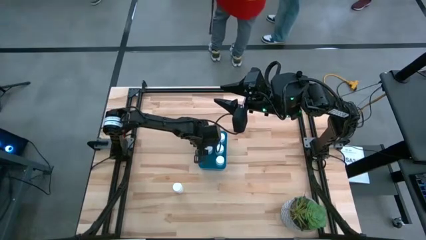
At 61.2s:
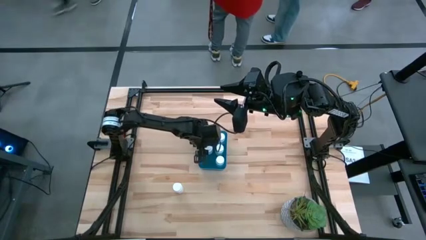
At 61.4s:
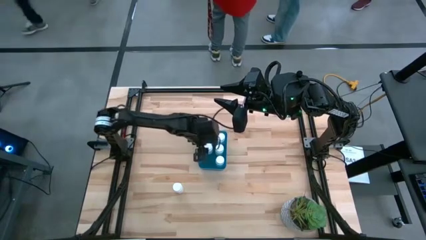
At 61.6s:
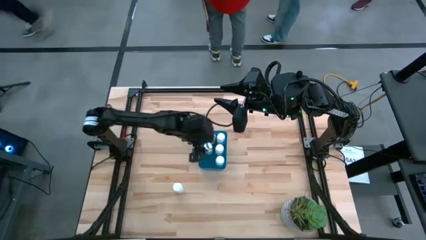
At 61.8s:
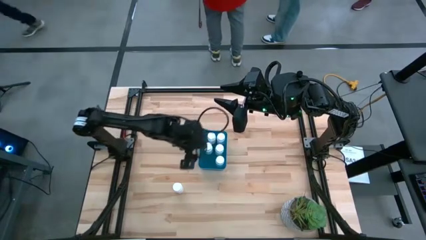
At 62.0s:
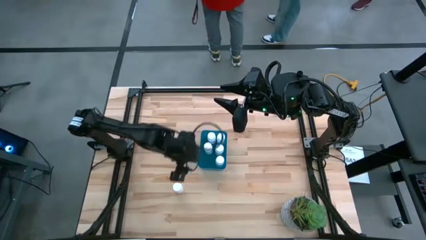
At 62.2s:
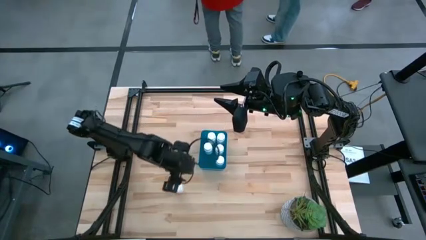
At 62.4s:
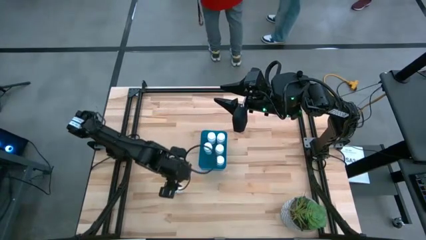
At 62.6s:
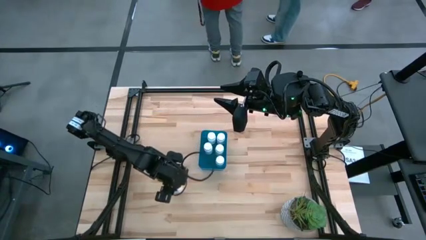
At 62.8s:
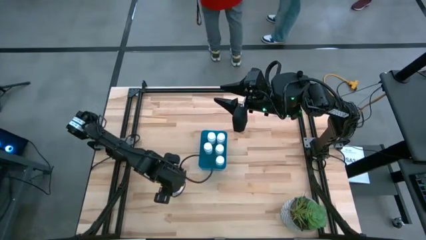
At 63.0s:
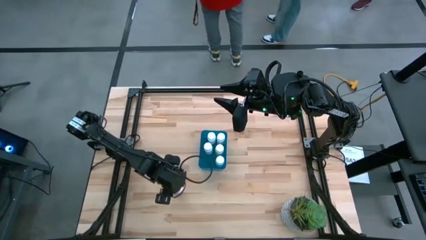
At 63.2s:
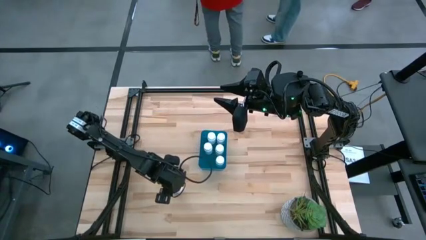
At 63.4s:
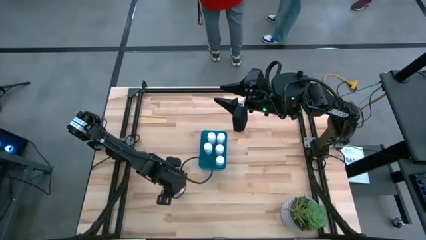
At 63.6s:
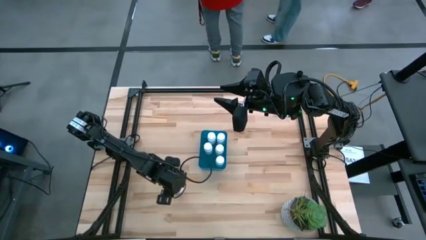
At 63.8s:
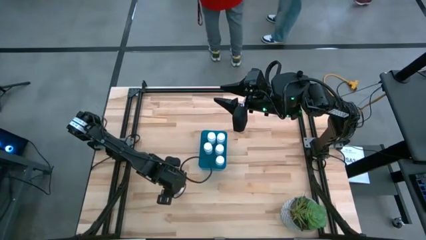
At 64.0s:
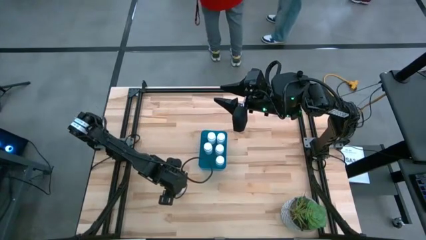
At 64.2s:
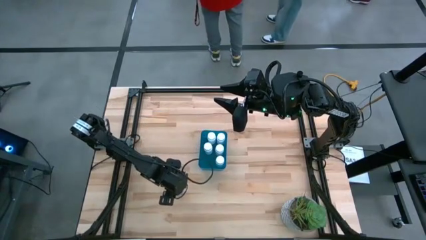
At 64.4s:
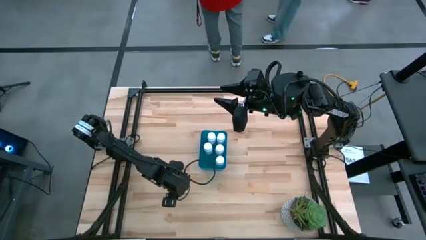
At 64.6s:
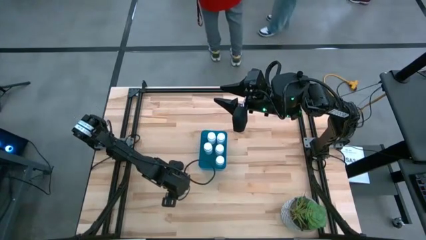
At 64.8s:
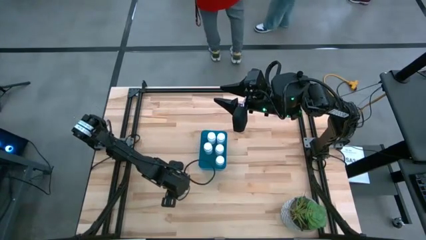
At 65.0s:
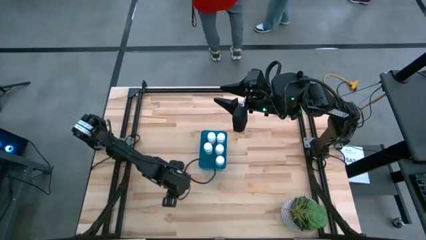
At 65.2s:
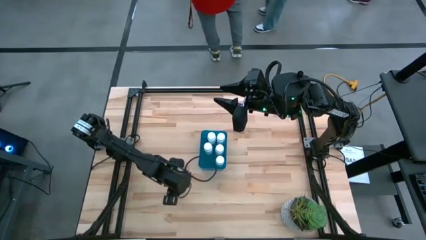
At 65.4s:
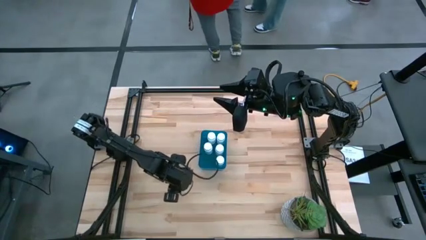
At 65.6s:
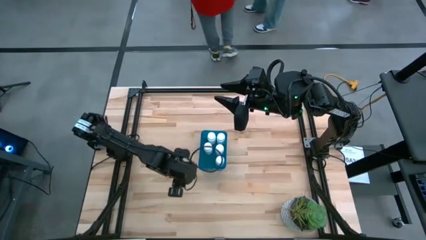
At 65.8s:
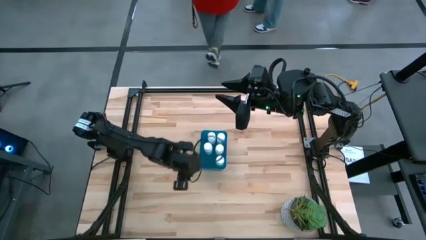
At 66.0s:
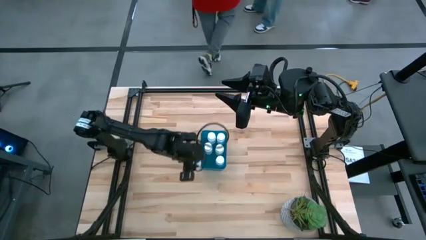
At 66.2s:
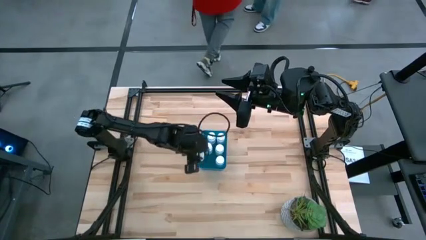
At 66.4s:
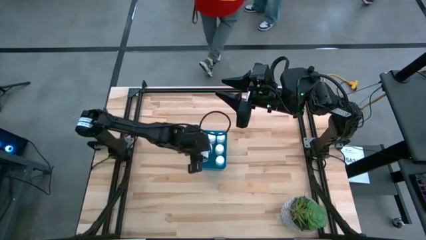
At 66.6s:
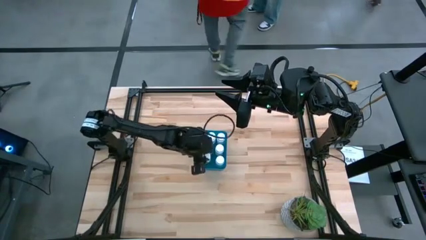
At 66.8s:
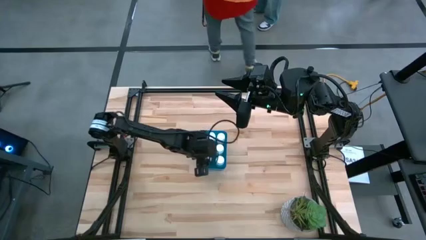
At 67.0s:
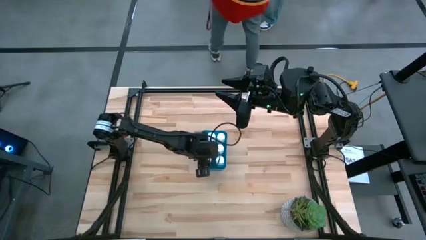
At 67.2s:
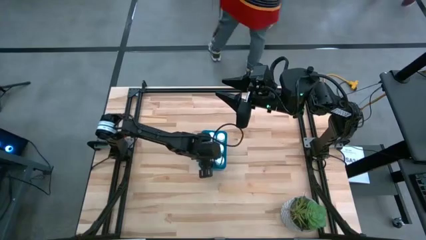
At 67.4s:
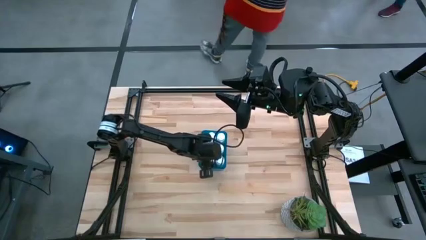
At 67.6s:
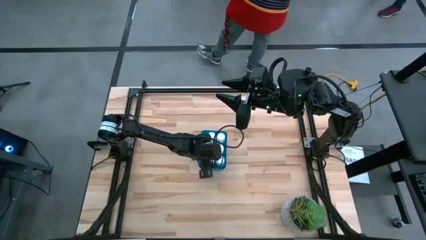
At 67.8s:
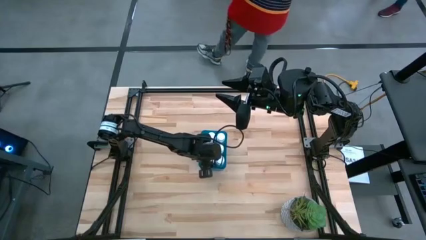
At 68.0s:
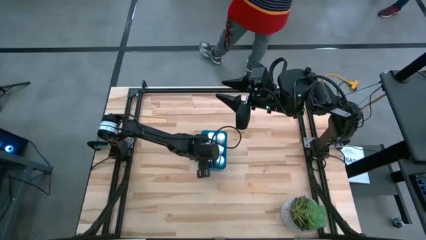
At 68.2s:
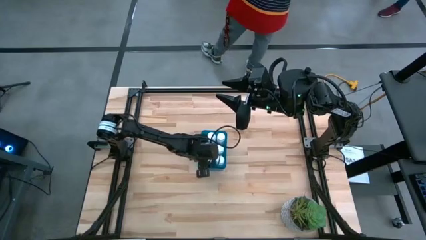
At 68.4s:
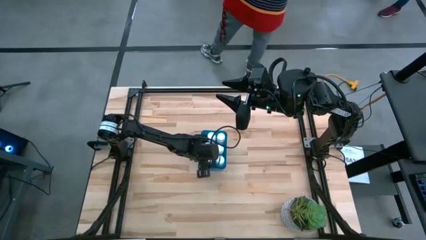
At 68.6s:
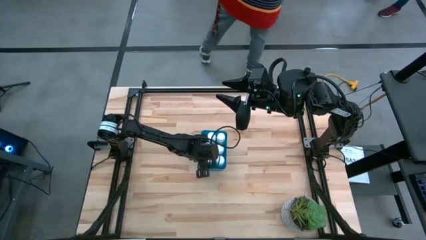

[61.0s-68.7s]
Task: Pick and place pill bottles into a basket
Put the white medicine bottle into the container

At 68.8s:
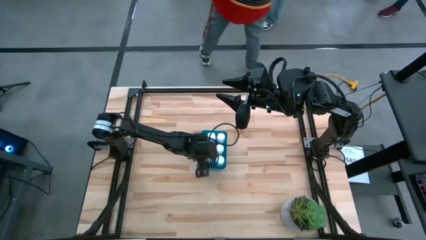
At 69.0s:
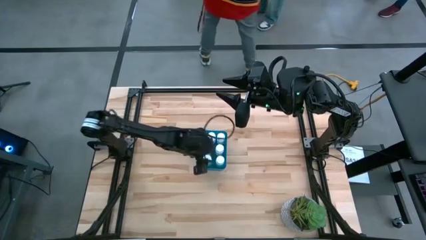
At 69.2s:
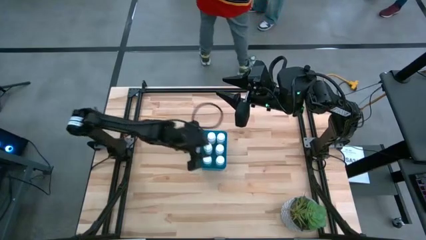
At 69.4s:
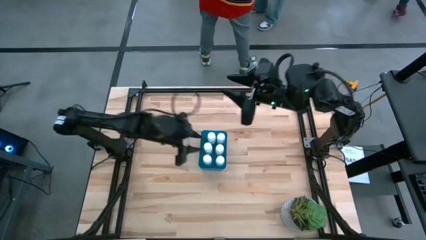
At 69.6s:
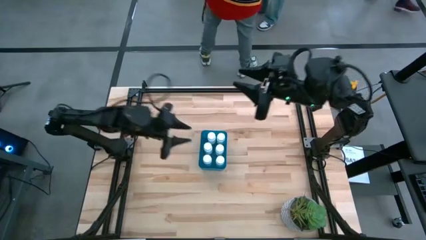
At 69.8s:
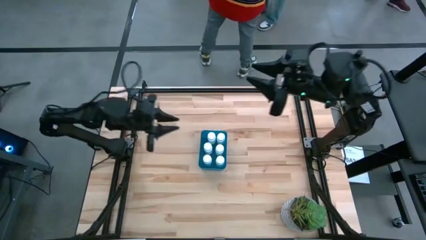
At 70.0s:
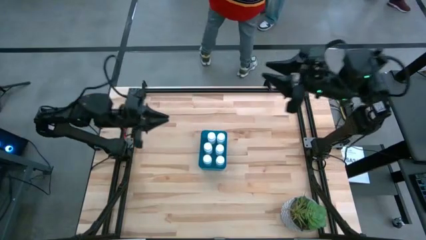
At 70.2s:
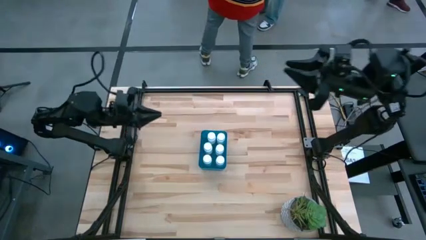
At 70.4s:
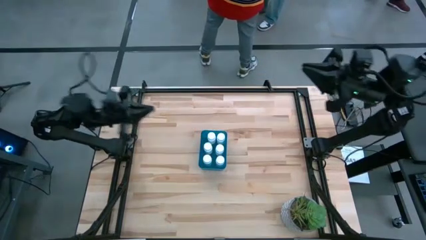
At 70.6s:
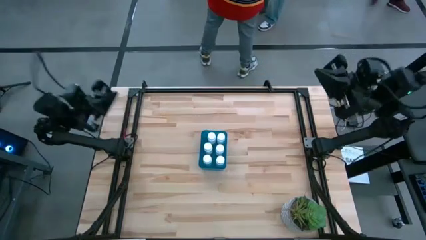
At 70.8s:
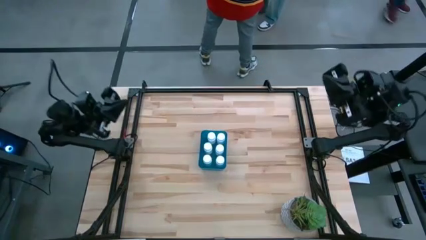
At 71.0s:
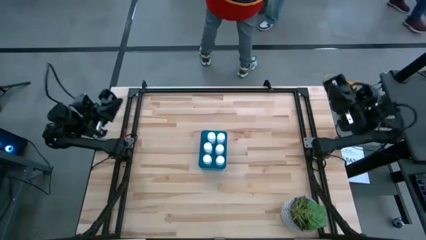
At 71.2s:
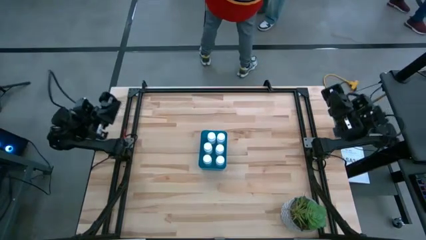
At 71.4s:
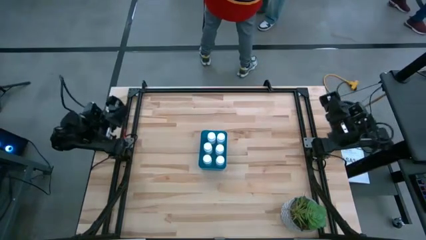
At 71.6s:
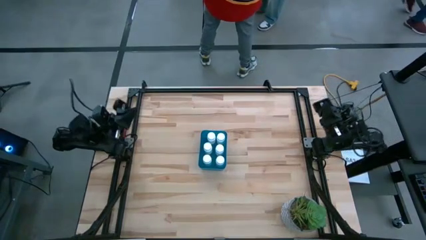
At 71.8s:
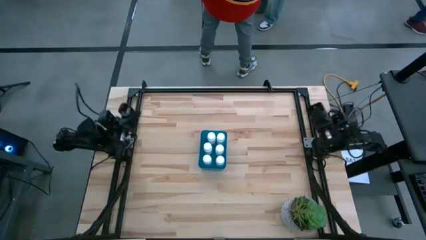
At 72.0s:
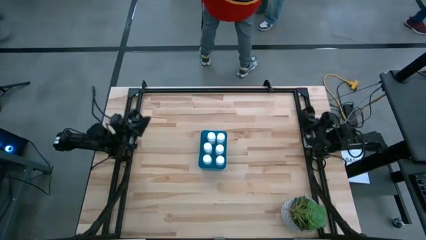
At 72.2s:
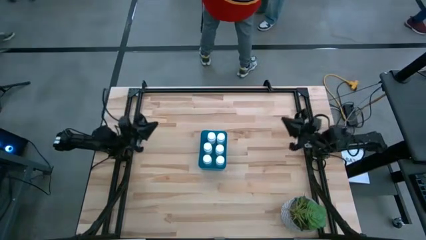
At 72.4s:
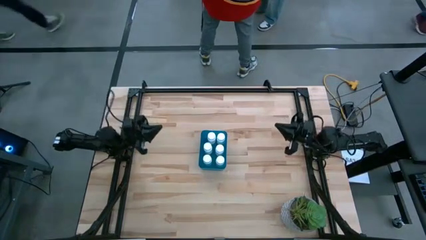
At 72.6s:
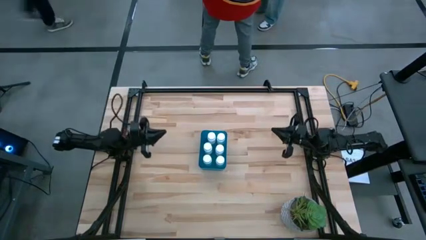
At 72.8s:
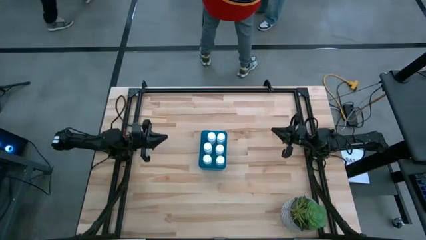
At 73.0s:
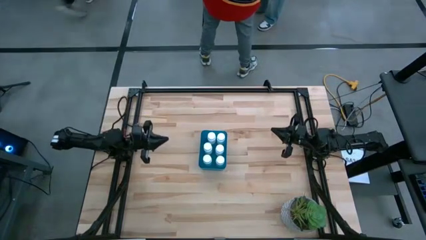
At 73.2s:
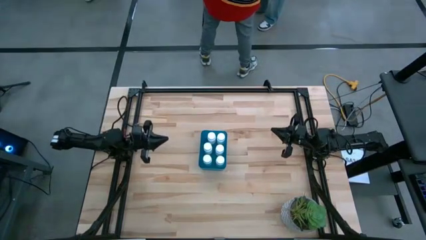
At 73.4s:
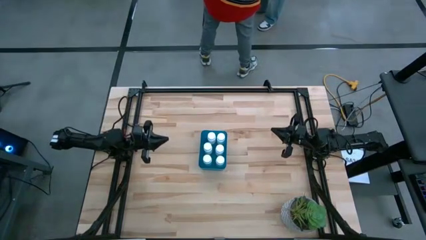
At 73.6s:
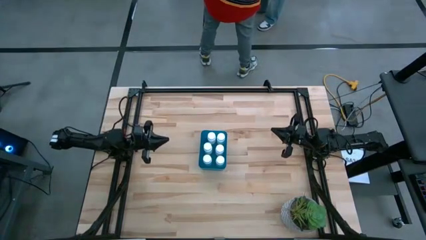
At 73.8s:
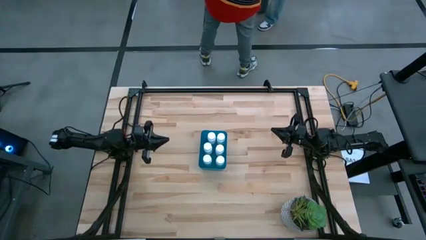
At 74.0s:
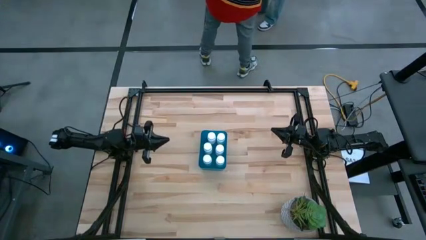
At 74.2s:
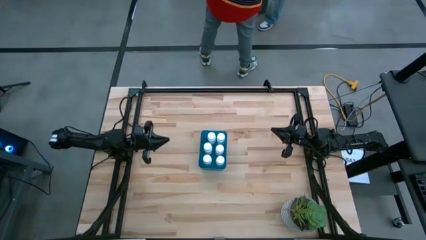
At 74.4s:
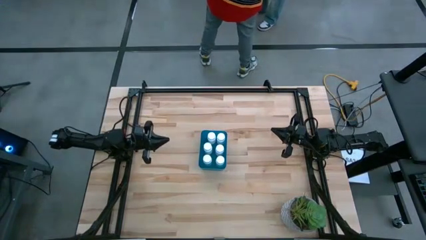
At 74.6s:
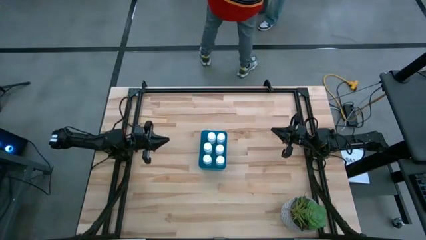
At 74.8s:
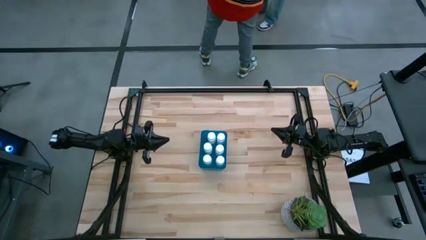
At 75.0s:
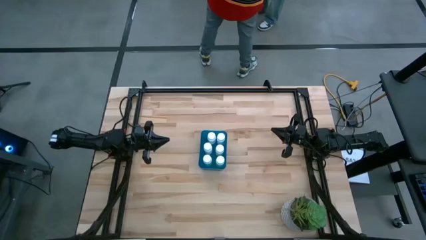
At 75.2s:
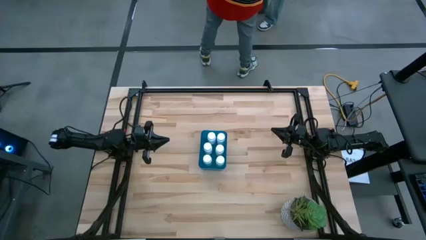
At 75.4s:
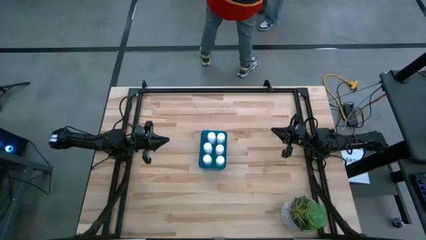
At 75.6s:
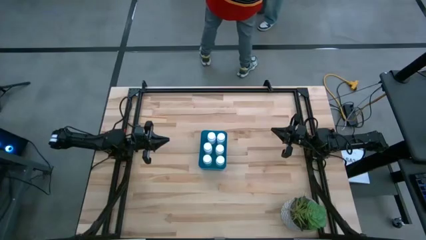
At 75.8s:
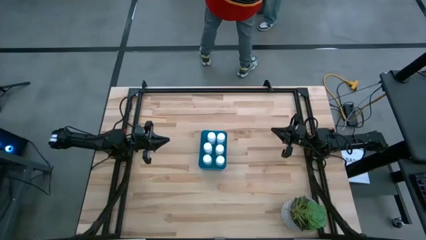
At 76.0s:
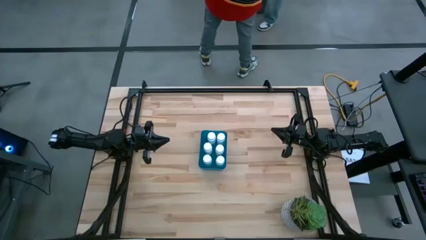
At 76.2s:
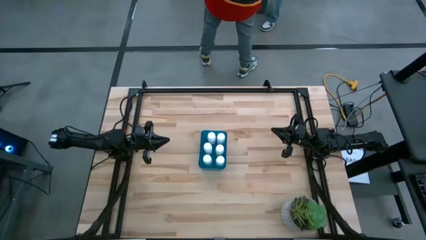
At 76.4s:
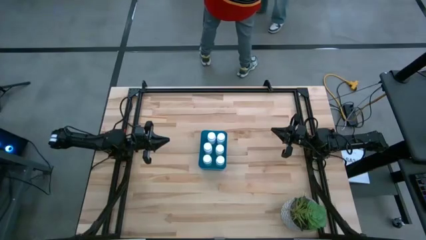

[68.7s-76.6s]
Return to Home Position

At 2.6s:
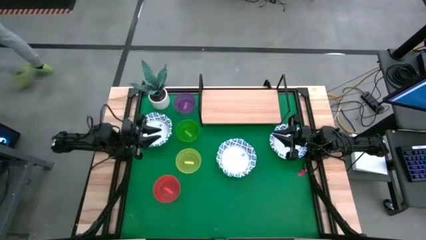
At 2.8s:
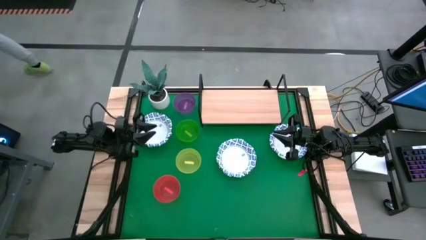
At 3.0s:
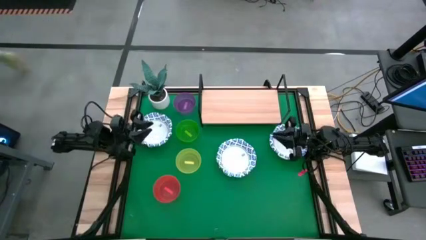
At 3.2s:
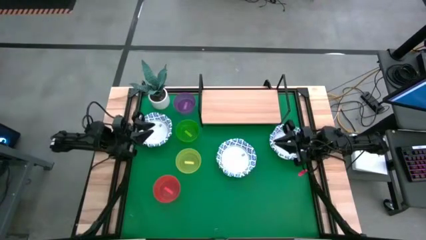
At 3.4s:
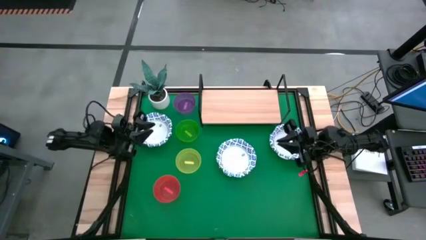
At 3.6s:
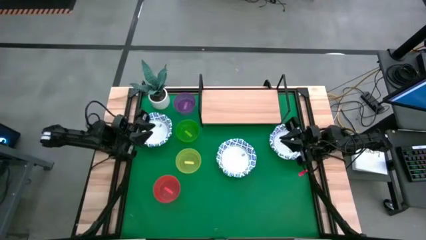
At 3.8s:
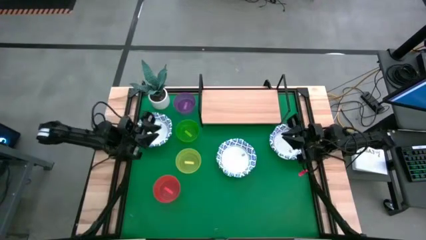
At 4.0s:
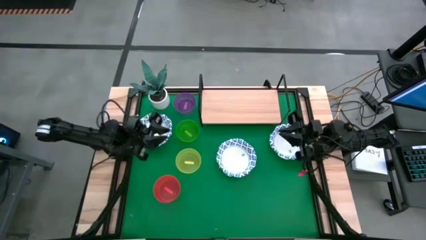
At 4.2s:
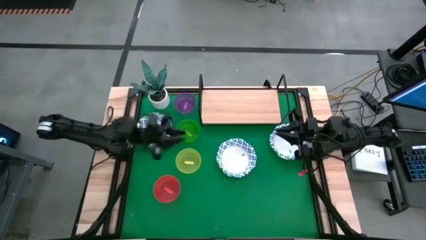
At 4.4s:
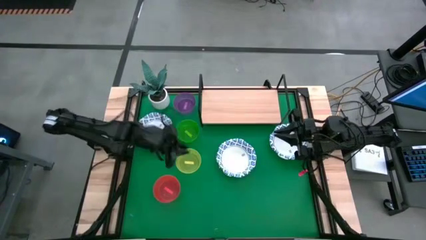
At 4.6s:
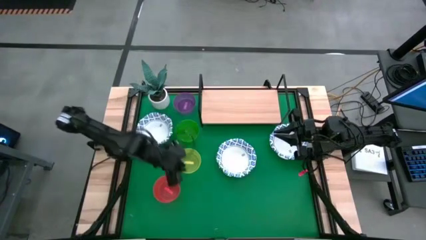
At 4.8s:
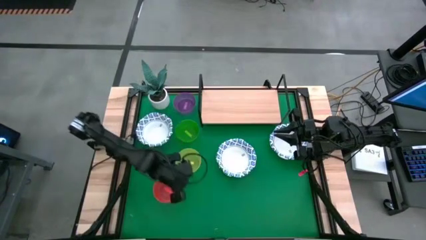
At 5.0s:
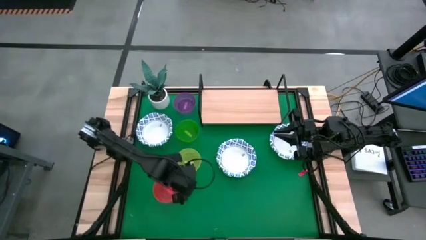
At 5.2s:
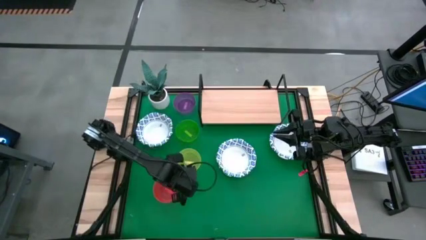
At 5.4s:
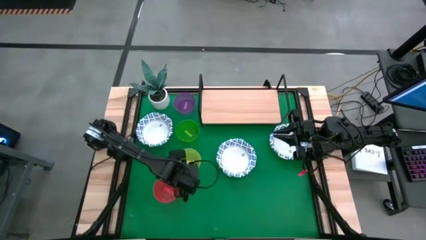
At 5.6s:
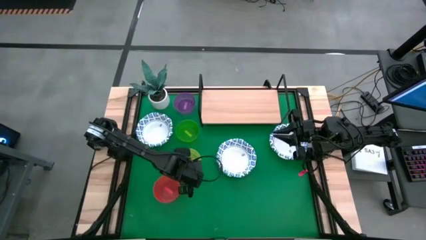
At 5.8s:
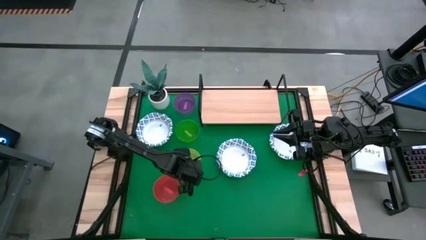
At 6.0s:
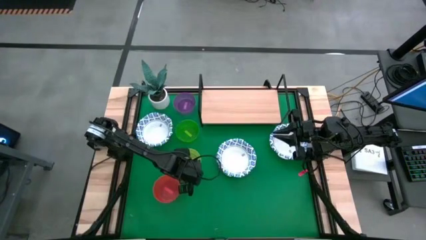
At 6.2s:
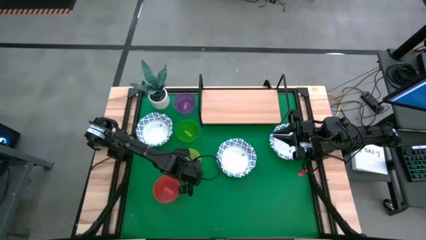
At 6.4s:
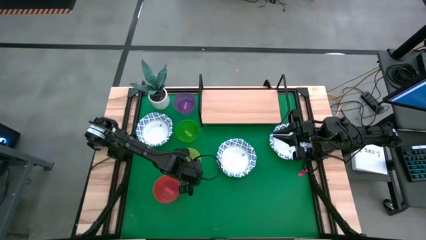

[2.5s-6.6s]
Task: Place and stack bowls onto a shelf
Put the yellow bowl on the shelf
